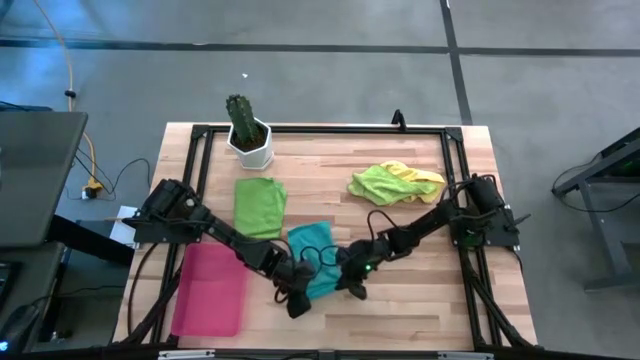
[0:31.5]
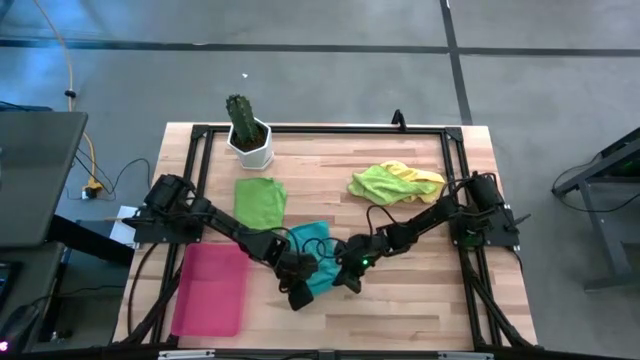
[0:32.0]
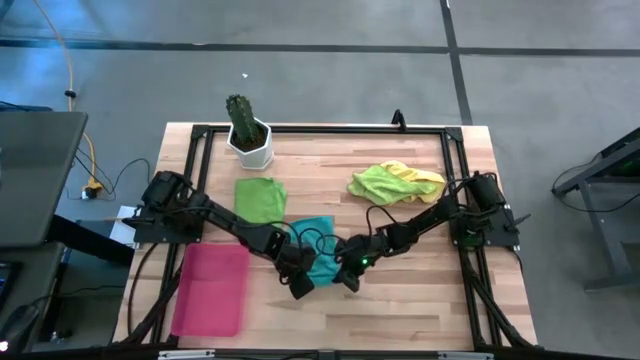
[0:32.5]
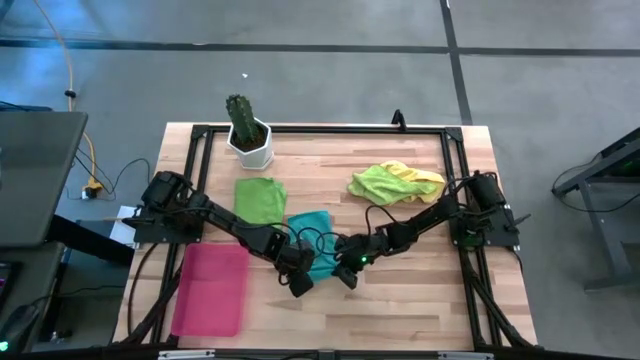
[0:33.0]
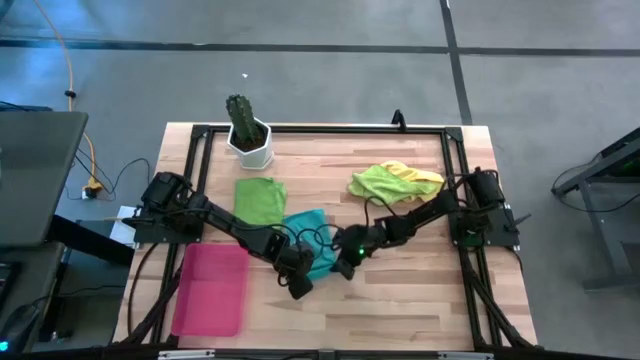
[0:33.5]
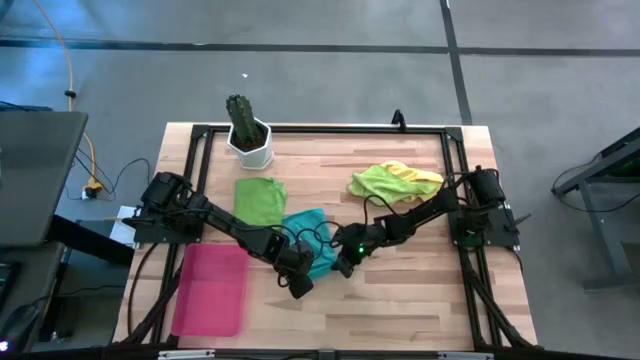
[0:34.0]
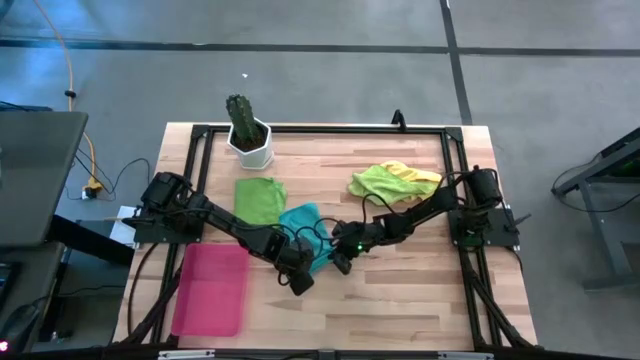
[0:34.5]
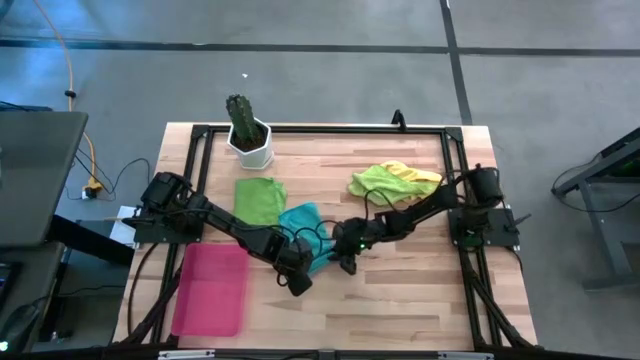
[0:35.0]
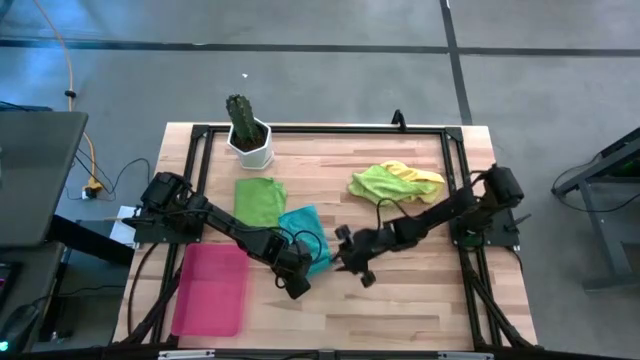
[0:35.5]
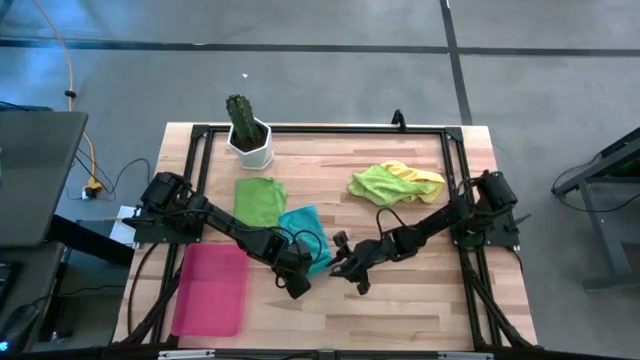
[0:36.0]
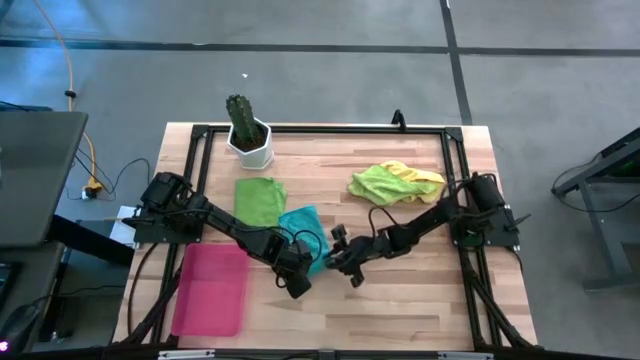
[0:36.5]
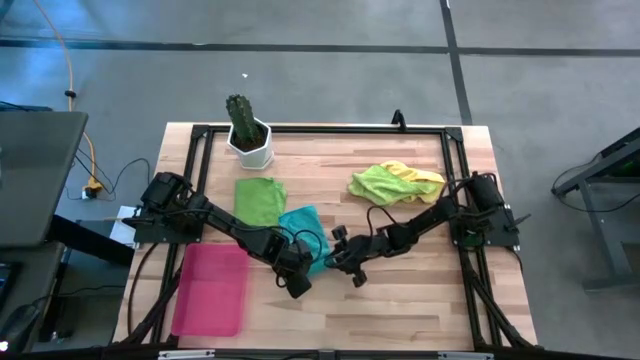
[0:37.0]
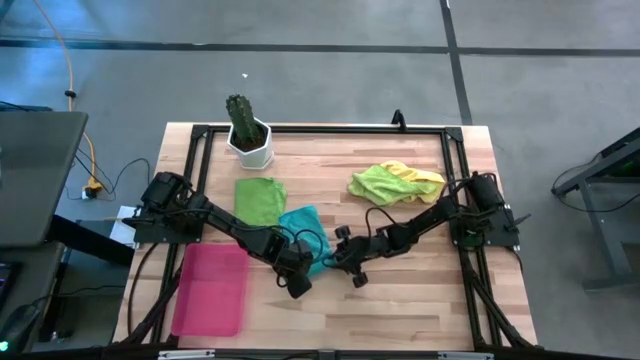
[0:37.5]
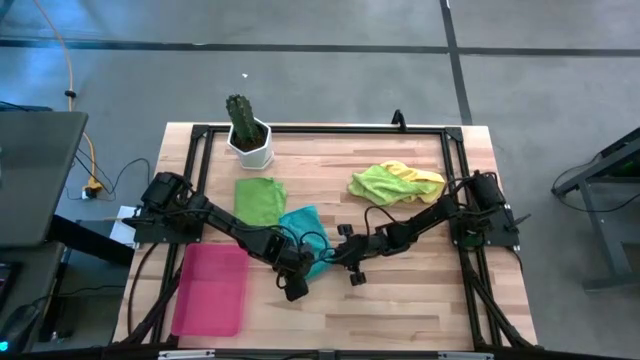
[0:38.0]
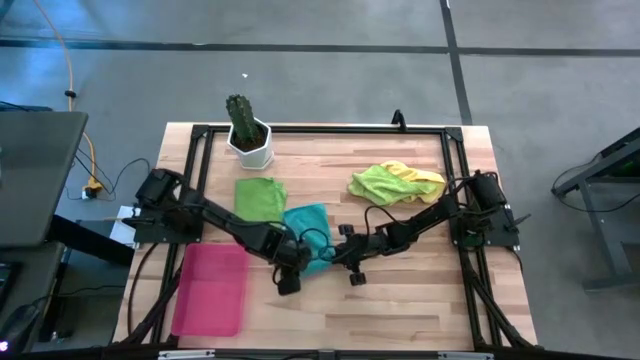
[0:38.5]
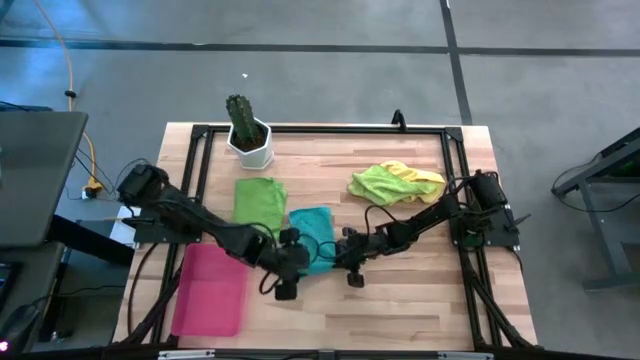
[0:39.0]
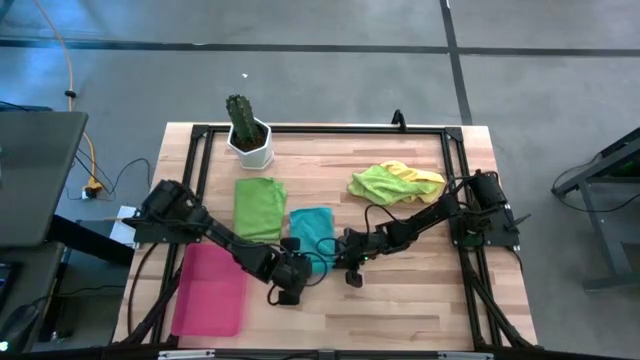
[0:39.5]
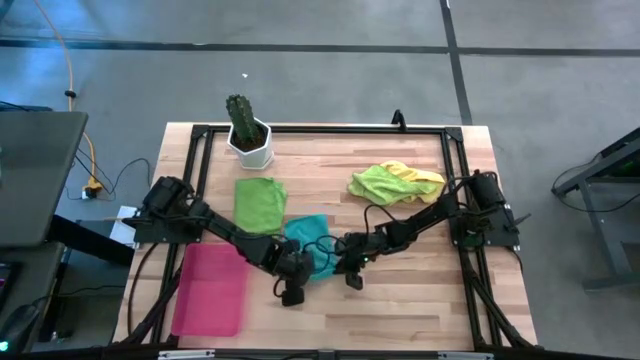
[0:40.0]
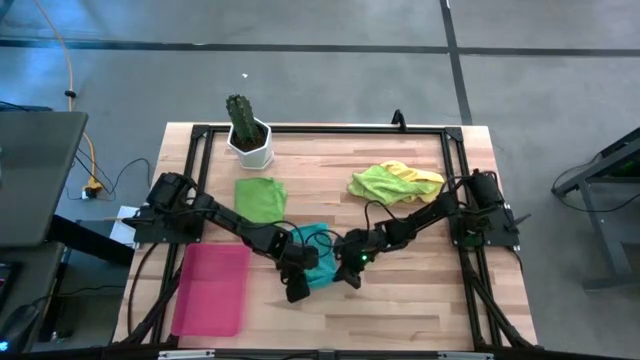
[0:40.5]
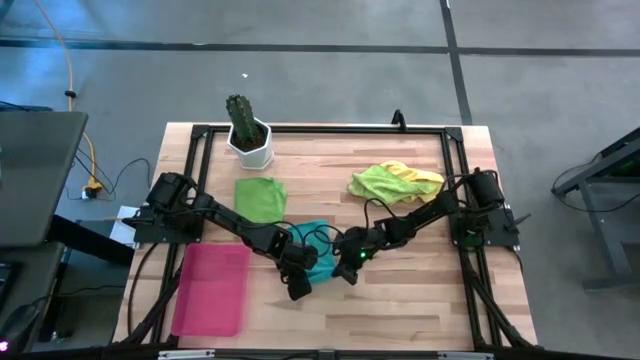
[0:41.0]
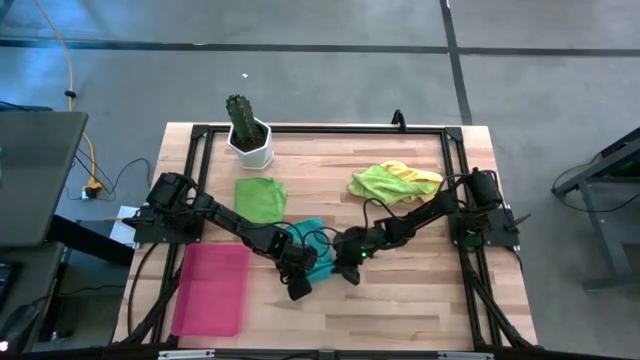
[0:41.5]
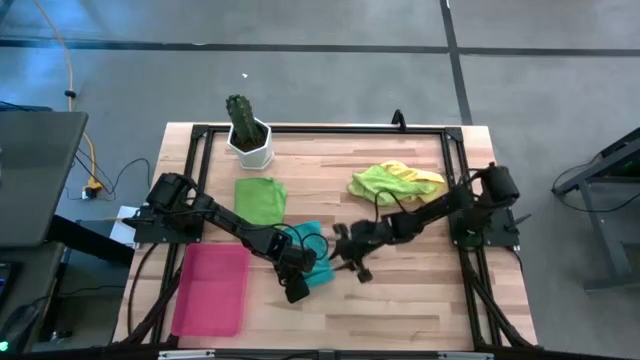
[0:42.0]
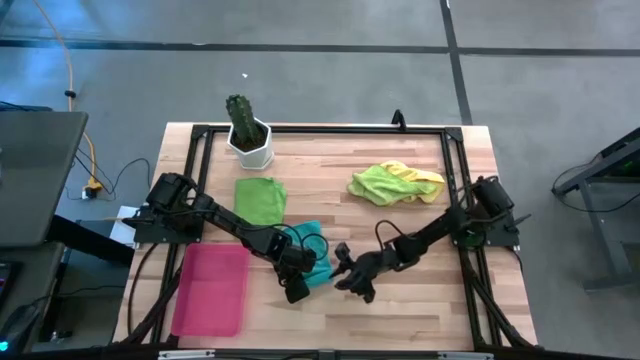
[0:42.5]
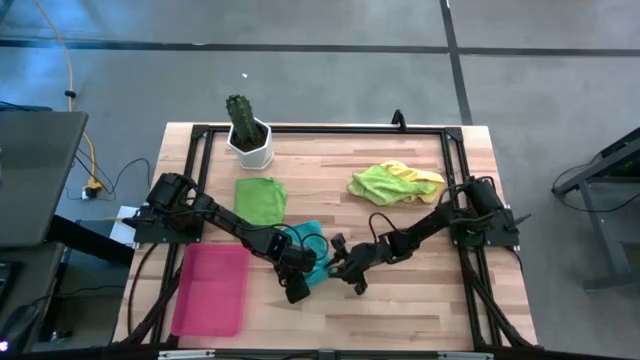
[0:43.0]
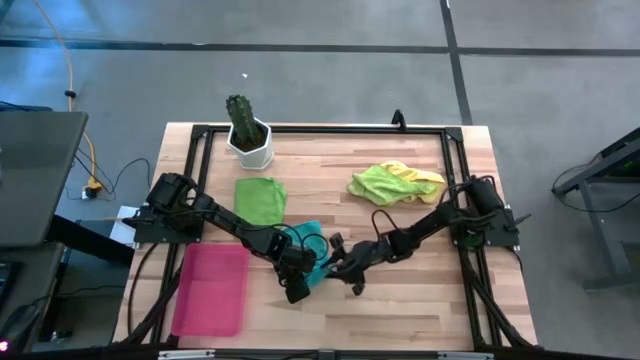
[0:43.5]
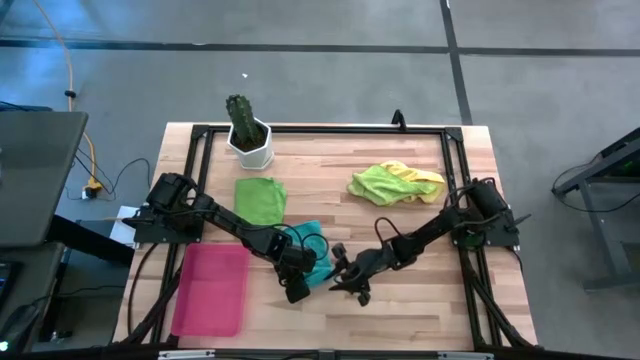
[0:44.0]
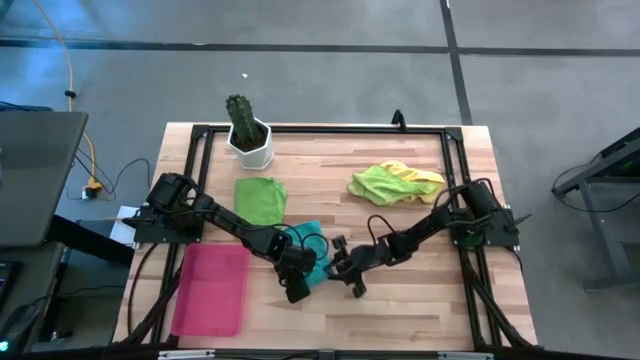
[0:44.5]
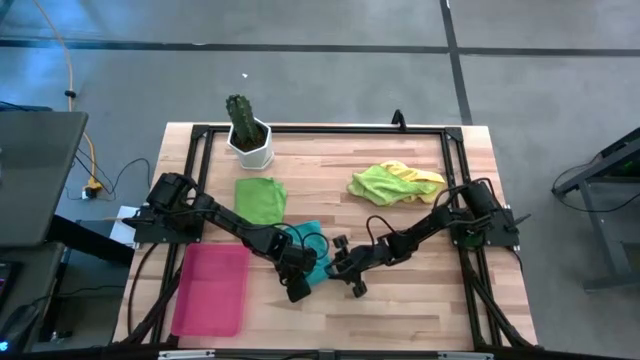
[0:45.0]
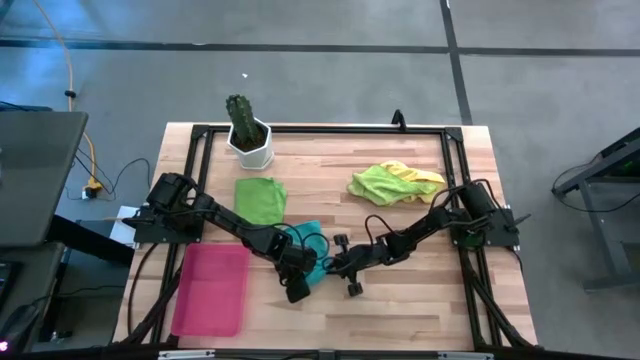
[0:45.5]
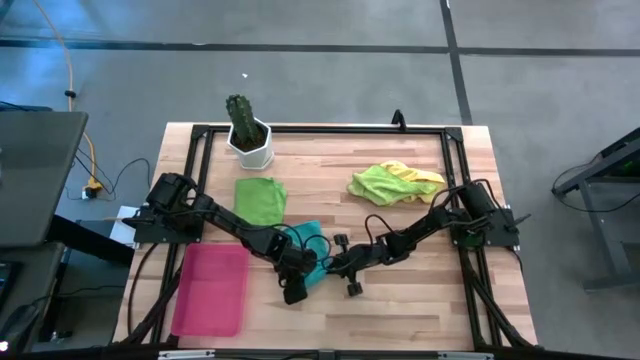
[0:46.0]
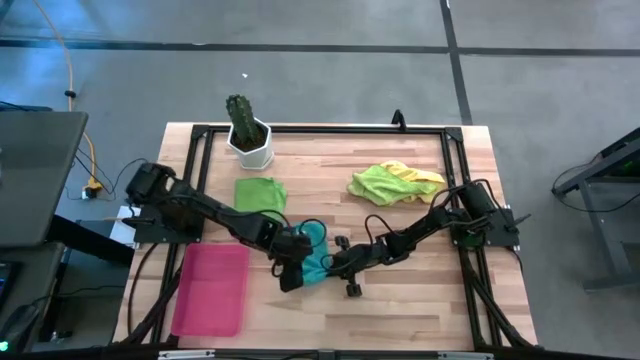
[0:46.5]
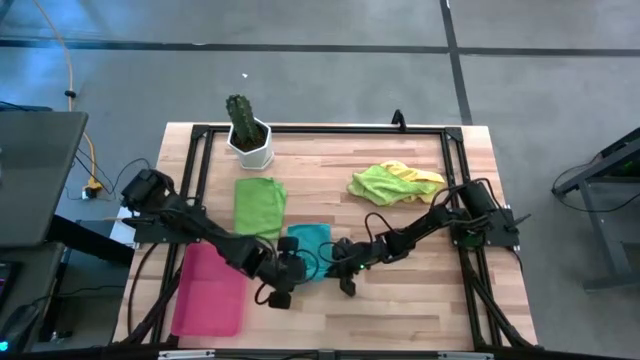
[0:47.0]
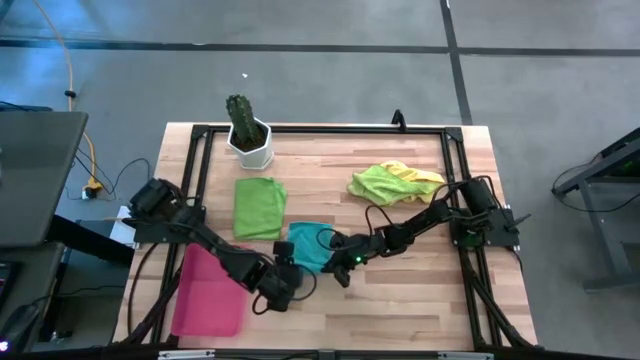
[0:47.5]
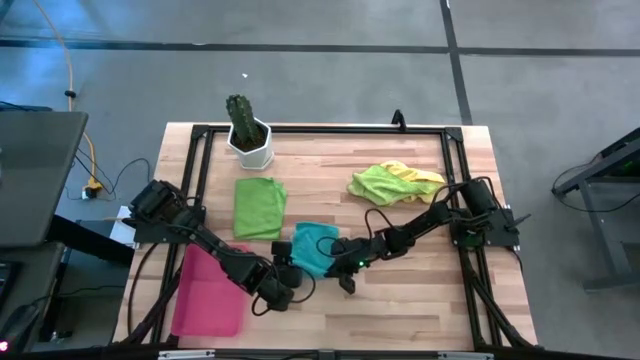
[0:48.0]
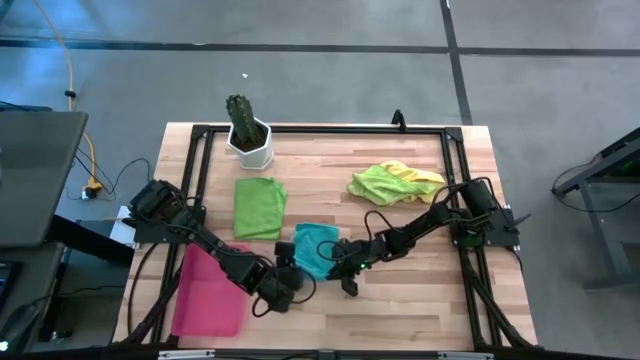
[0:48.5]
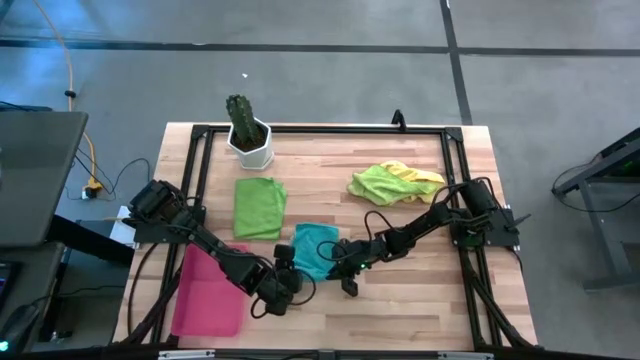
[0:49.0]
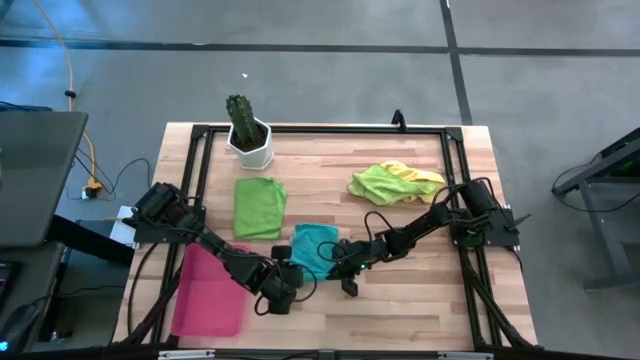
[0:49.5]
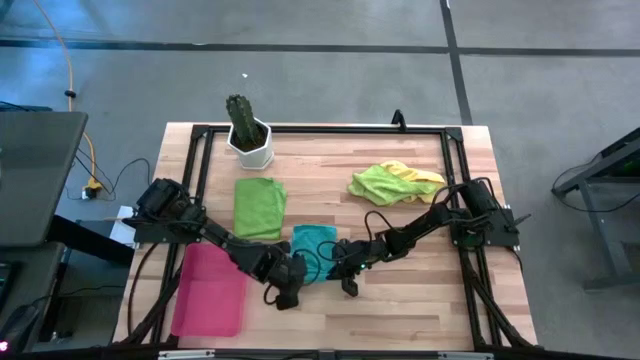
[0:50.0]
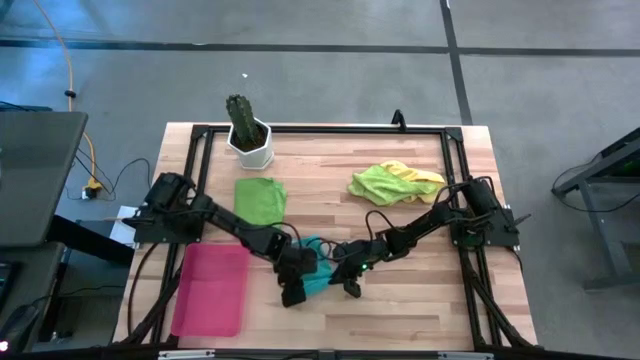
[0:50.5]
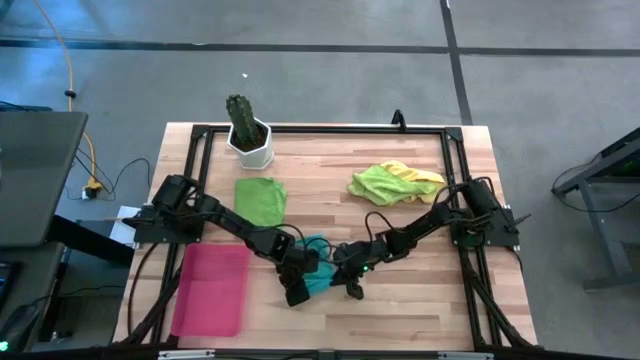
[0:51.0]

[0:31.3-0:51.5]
Task: Roll microfiber towels into tight, uniform cylinder then place into a basket
Roll the blue towel
